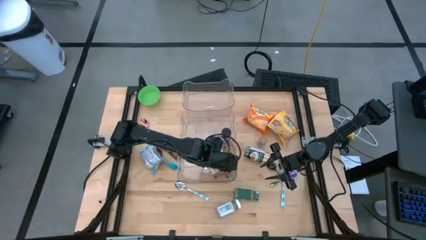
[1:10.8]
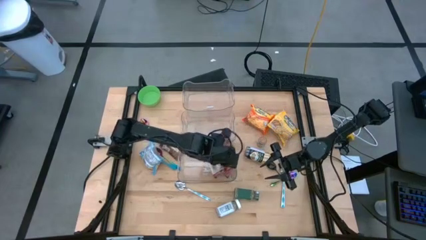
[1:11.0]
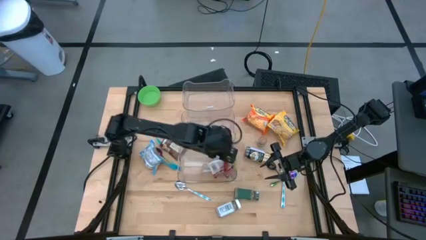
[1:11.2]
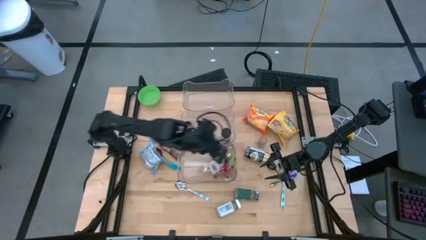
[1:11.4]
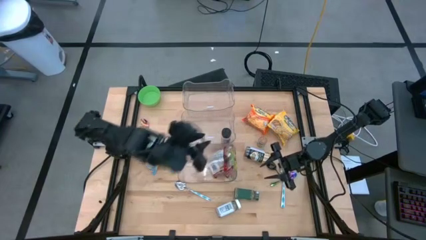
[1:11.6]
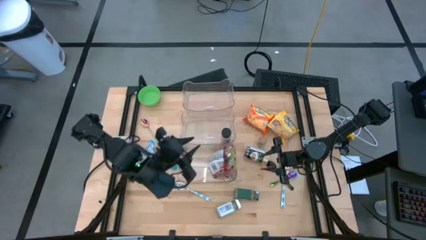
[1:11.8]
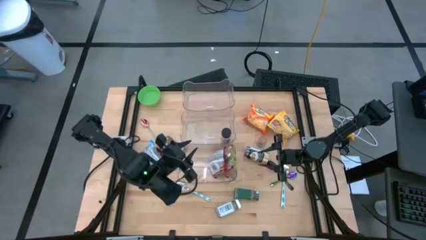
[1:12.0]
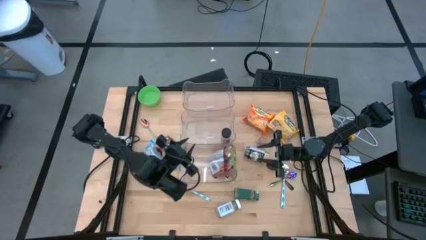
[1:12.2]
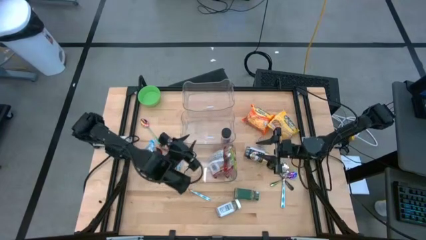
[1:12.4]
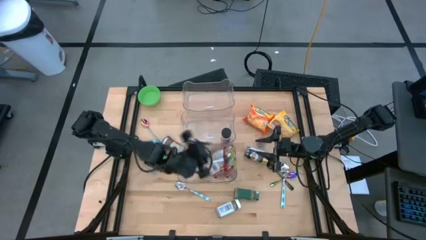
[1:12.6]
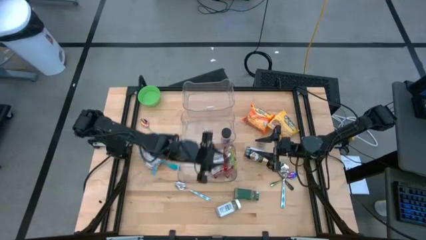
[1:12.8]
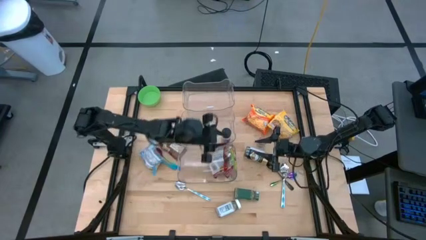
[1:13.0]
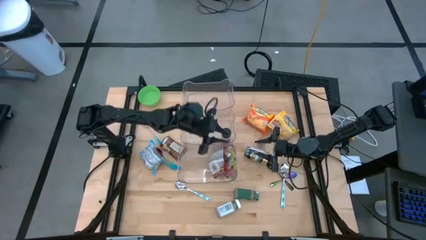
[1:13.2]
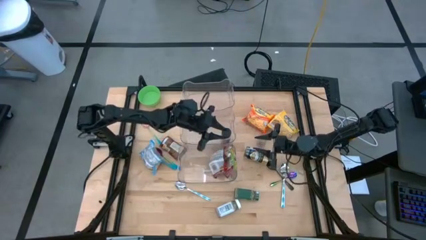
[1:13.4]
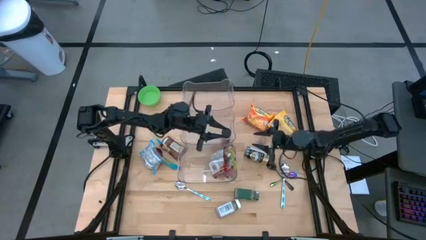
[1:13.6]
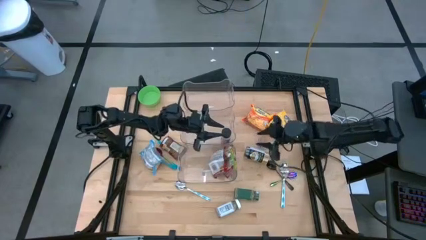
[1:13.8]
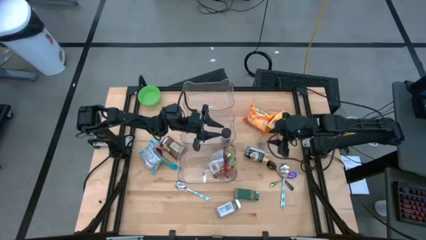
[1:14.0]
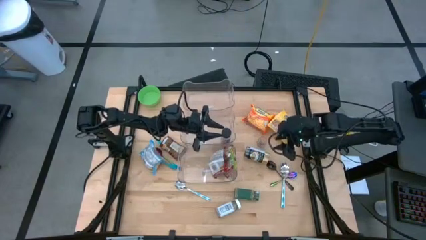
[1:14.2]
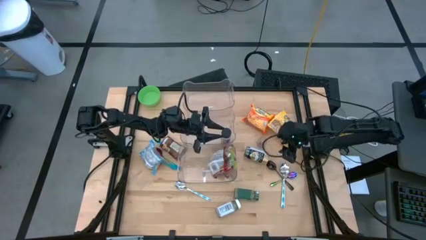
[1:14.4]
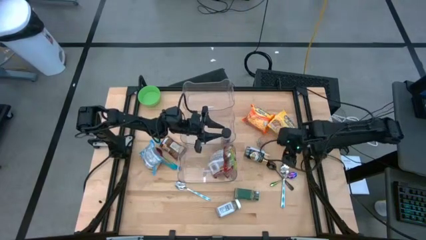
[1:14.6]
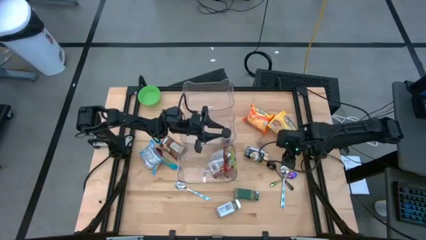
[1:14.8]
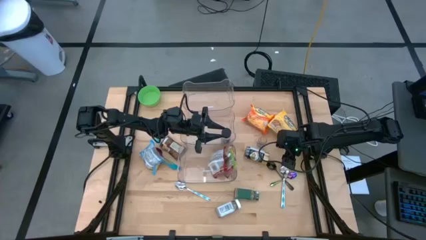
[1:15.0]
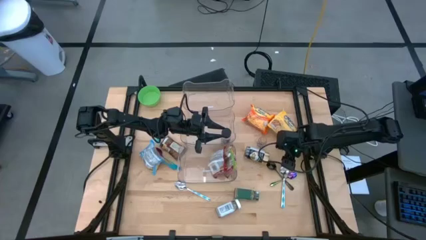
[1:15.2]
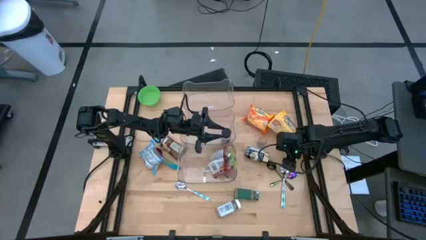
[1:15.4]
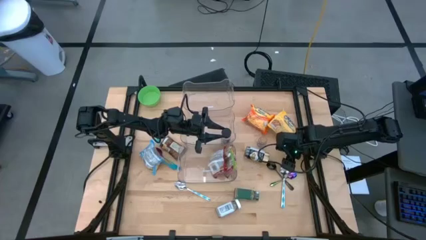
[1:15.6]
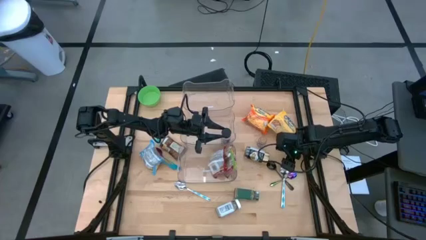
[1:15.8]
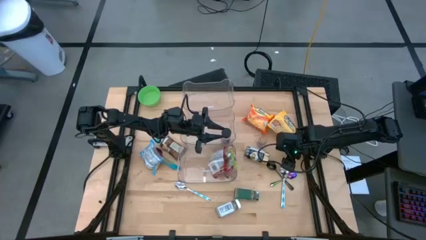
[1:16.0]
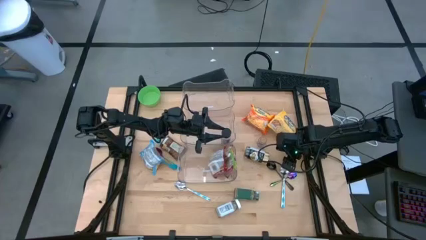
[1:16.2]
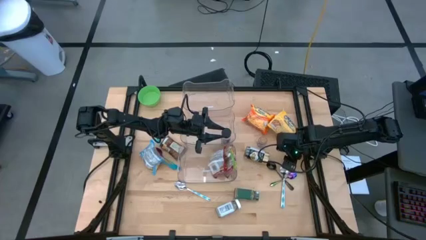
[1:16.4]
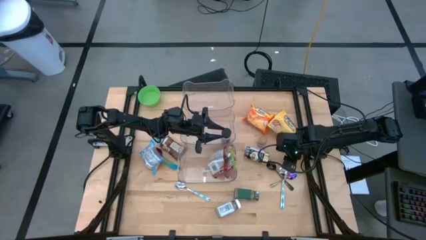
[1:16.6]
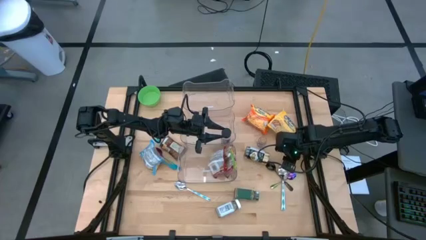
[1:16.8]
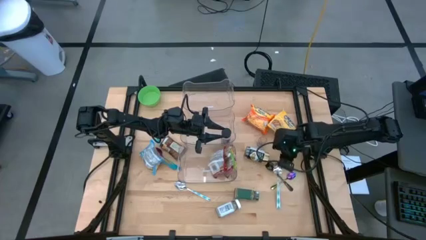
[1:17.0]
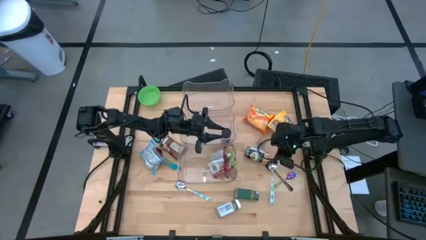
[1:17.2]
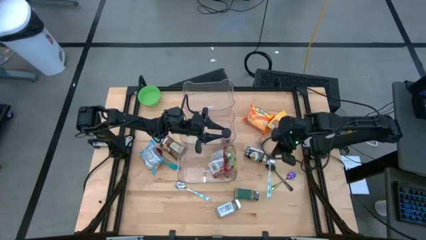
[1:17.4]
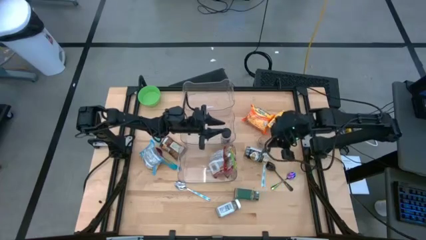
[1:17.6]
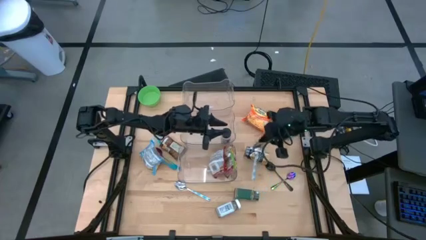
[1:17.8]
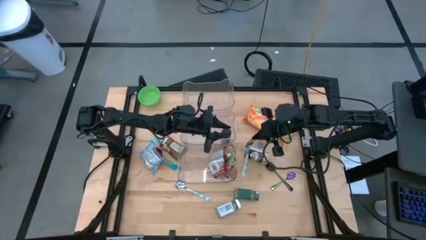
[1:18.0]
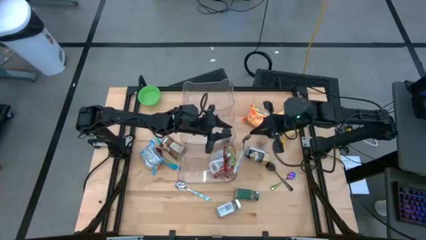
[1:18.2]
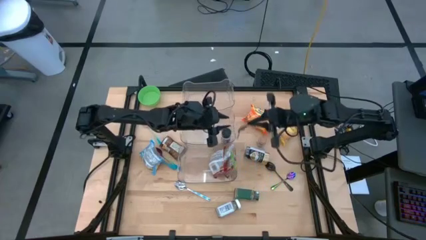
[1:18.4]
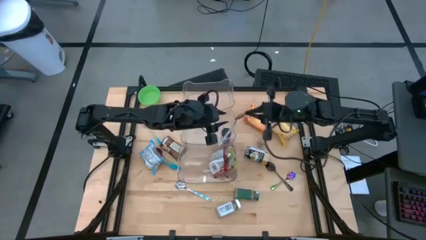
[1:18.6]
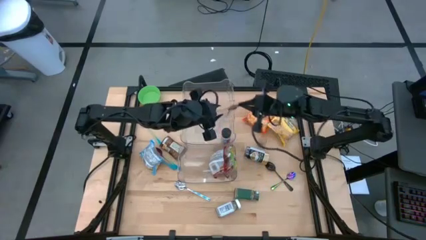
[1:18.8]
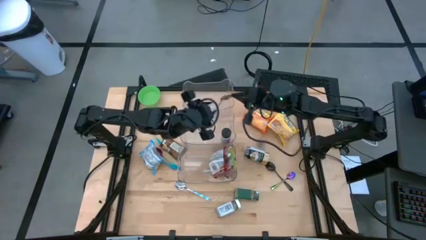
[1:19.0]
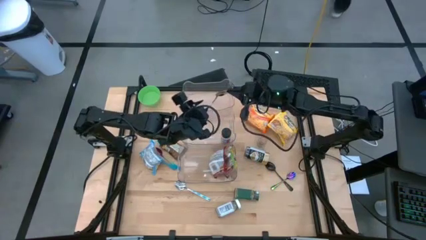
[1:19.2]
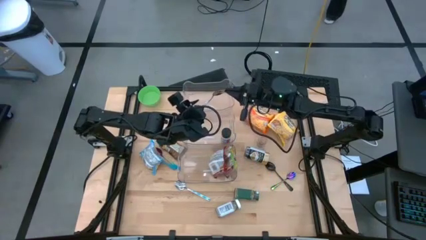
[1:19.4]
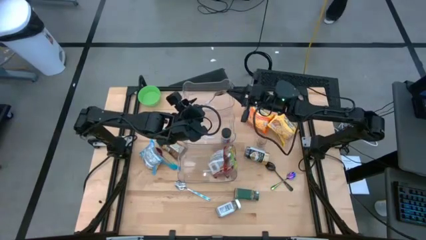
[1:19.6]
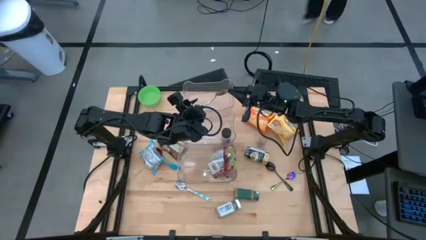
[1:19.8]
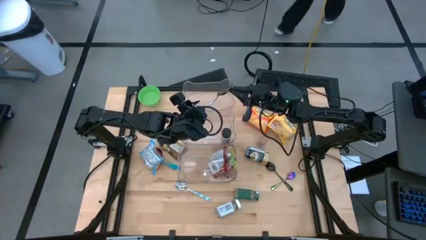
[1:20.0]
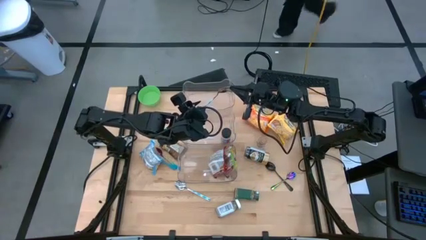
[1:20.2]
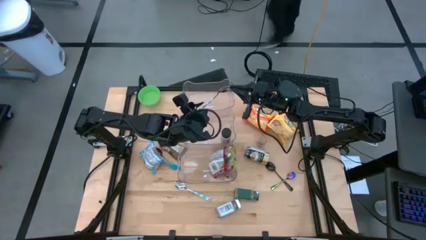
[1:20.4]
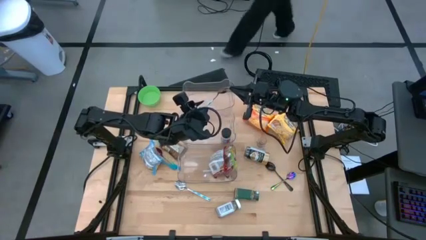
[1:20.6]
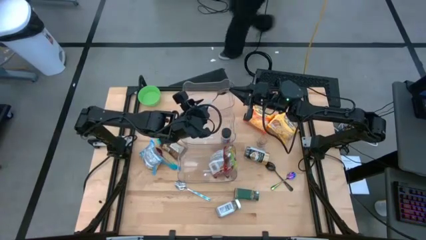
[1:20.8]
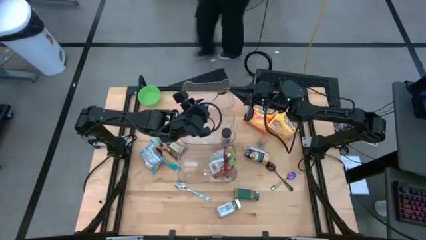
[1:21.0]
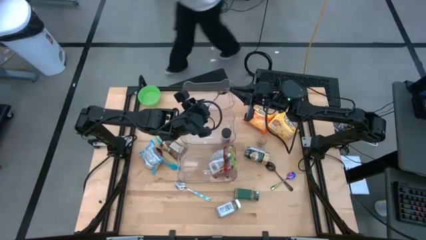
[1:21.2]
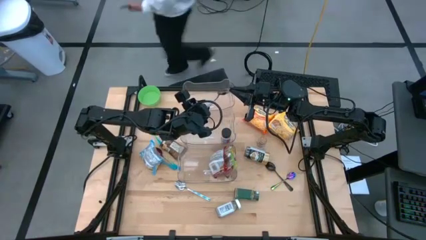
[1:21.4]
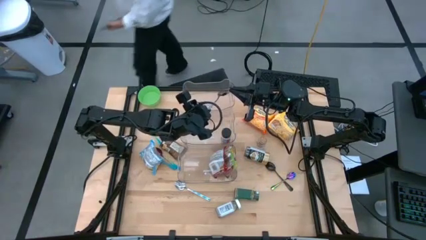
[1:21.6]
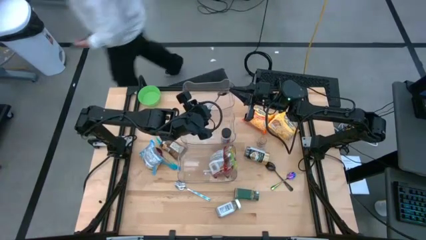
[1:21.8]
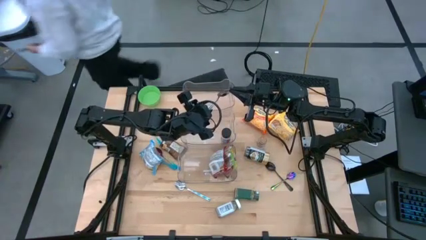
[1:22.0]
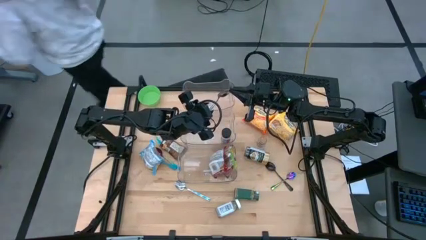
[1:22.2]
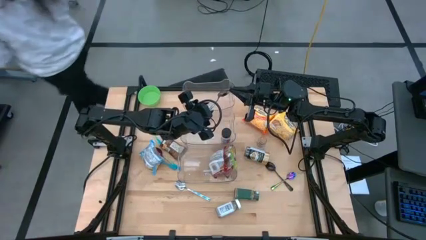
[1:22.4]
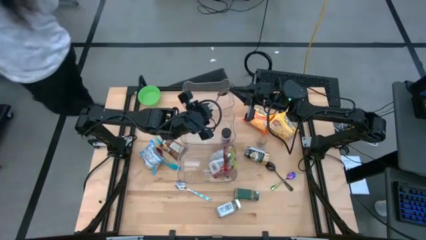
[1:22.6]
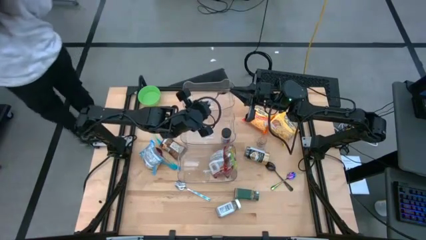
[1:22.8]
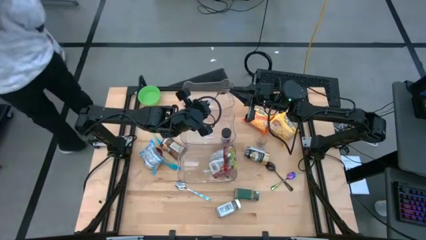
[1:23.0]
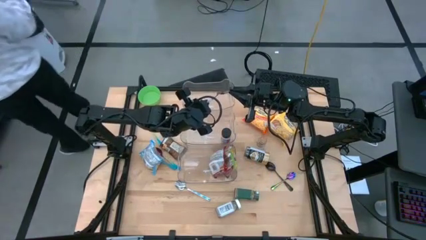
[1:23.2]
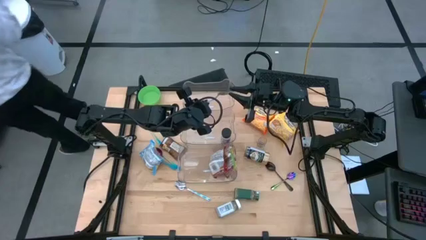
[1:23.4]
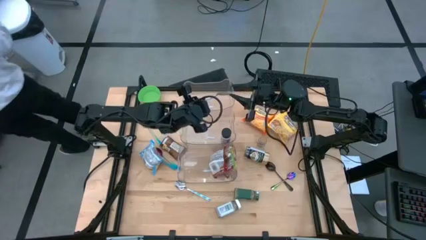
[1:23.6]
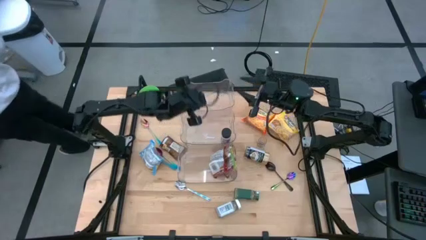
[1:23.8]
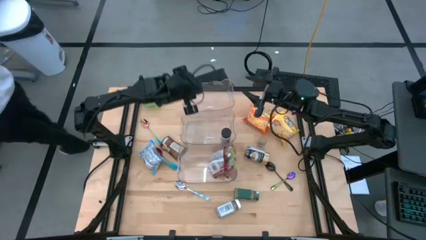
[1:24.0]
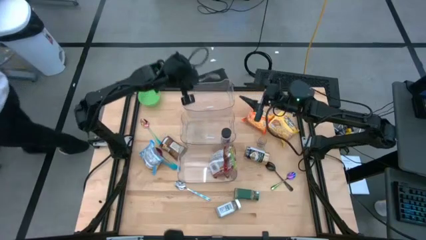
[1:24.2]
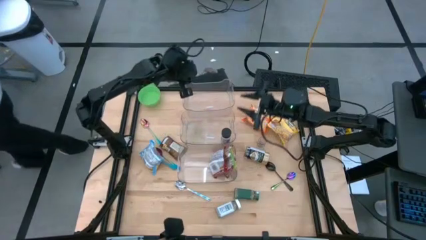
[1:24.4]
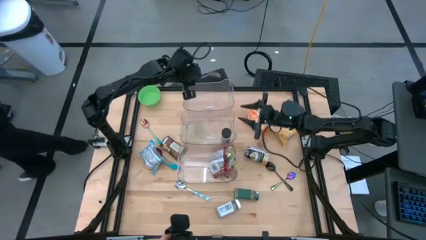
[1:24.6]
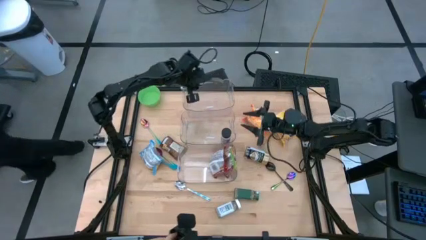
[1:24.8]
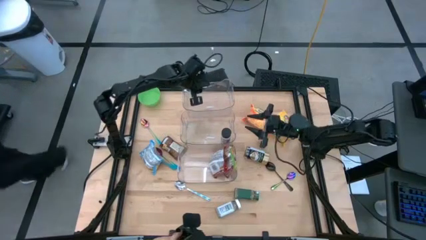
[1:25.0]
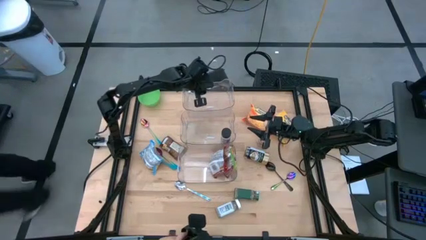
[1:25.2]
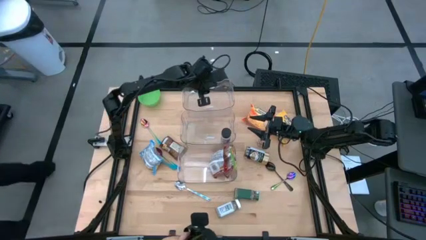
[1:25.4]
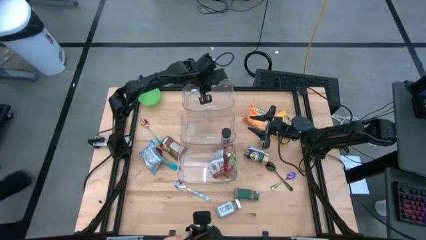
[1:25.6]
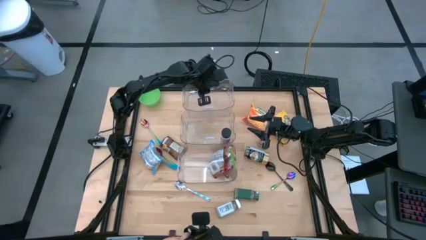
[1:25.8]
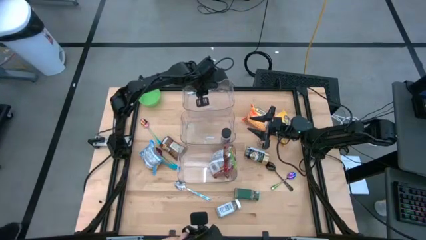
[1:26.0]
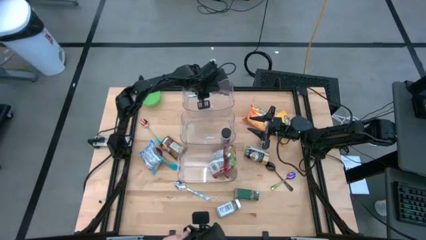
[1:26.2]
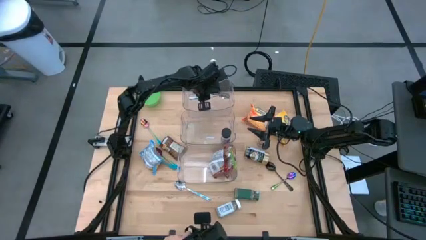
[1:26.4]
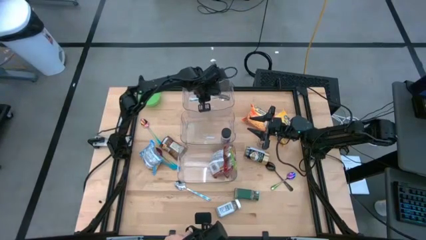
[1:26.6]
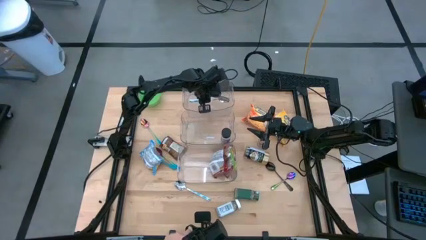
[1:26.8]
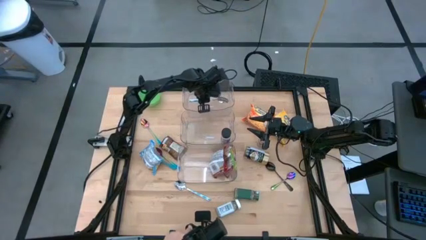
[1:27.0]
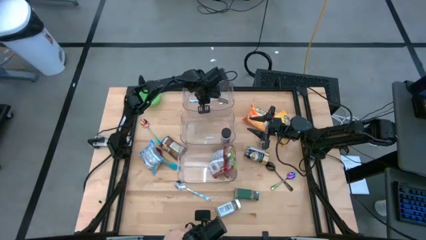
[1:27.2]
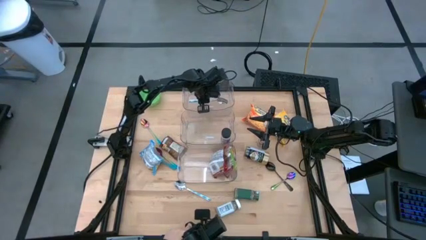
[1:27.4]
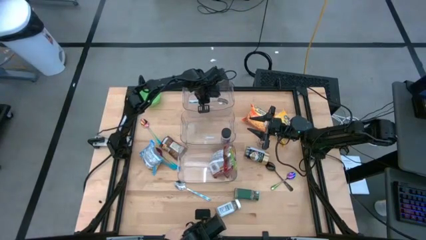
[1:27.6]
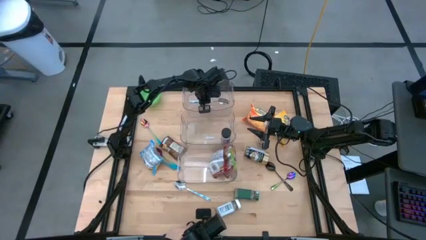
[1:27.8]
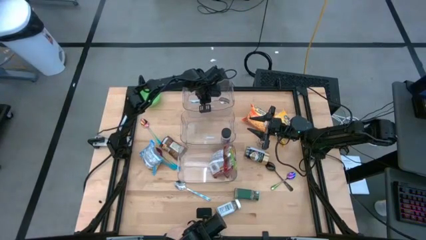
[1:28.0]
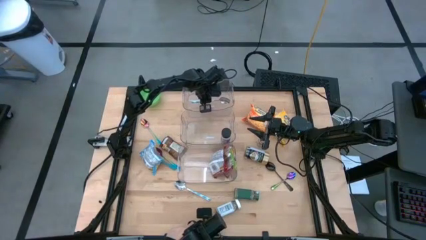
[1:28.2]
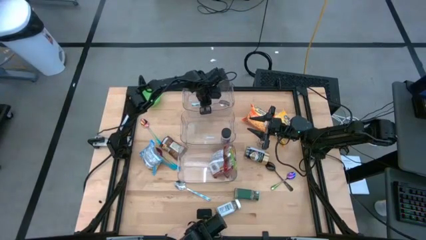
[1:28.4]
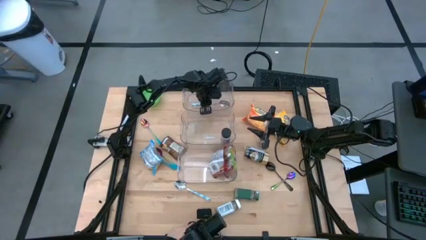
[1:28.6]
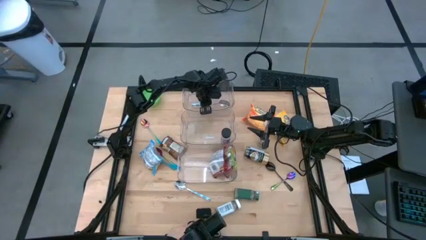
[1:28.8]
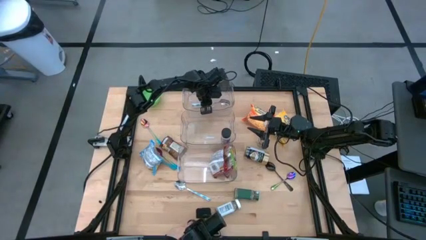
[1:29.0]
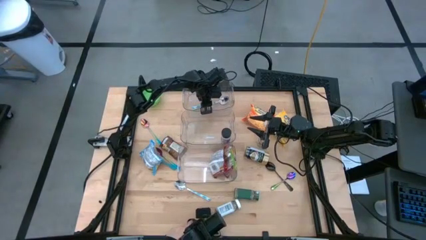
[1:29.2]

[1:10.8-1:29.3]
Task: Pick & Place Food Item
Put the right white patterned spoon into the top transparent bin
